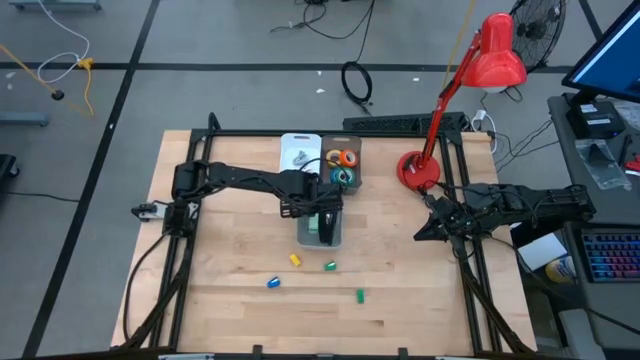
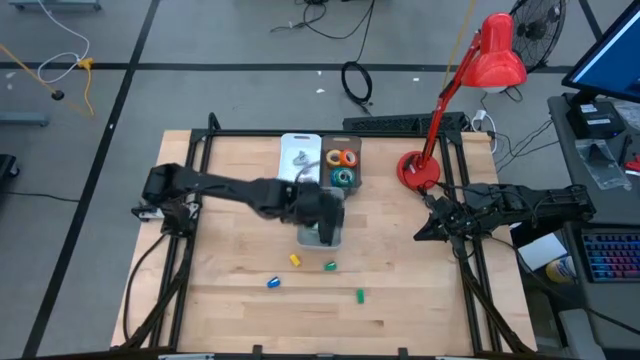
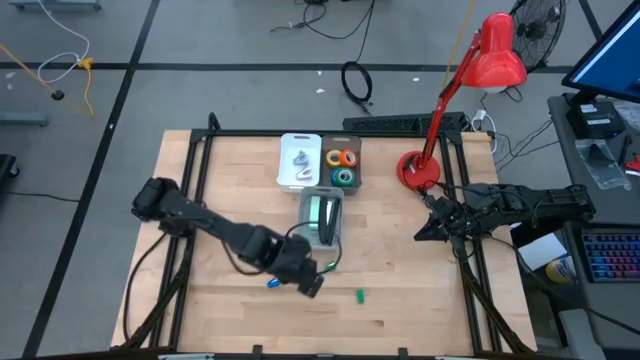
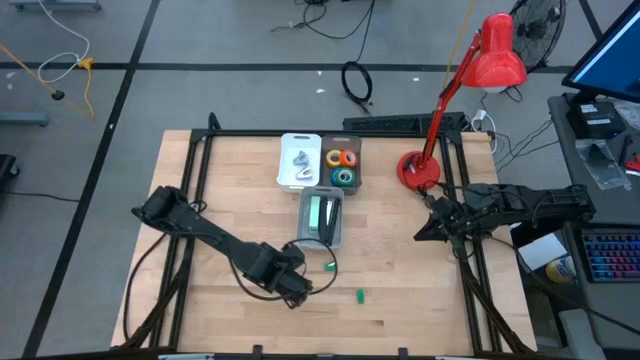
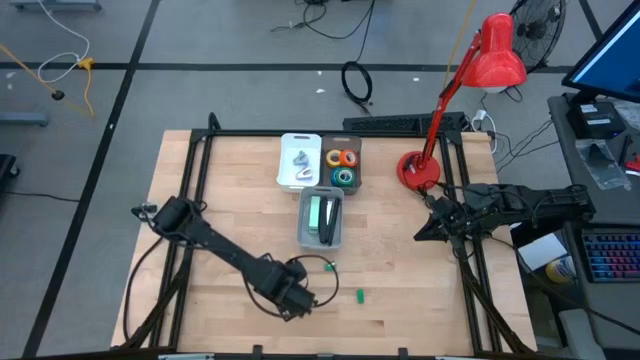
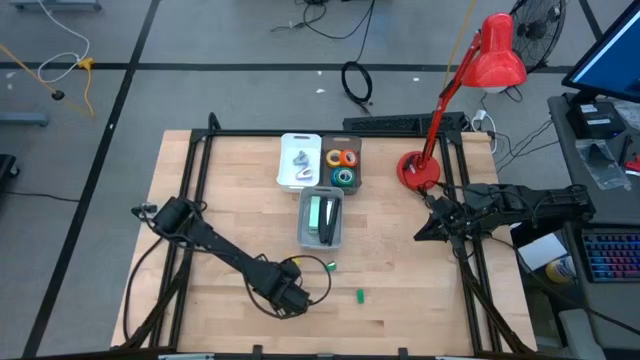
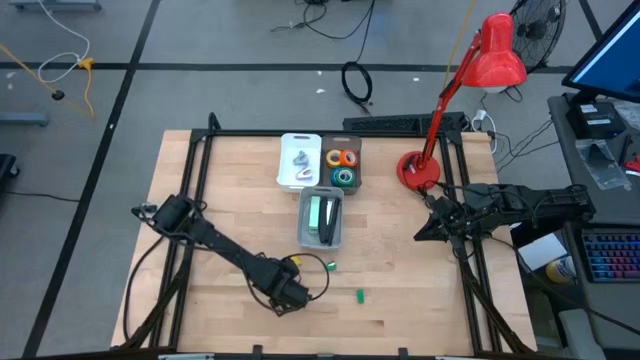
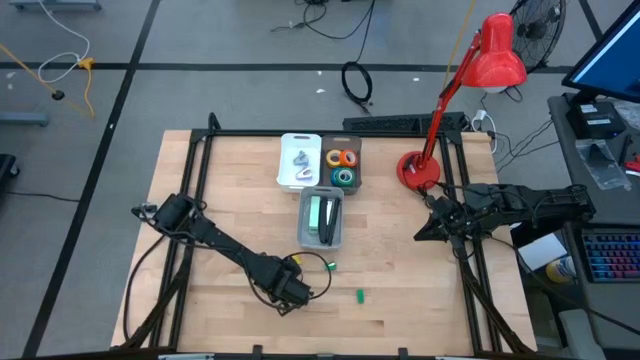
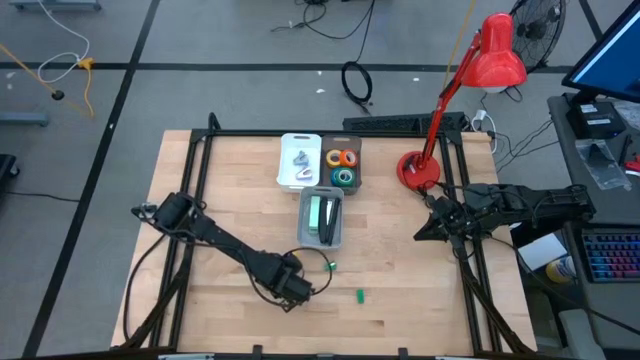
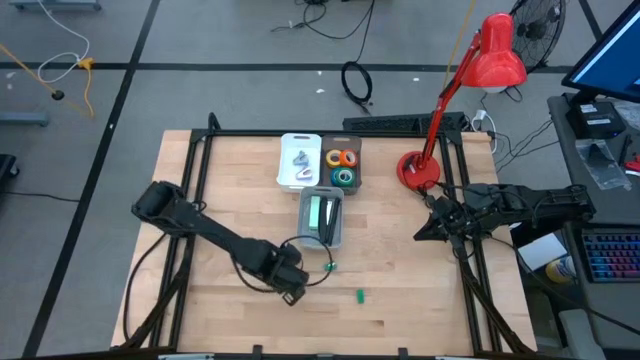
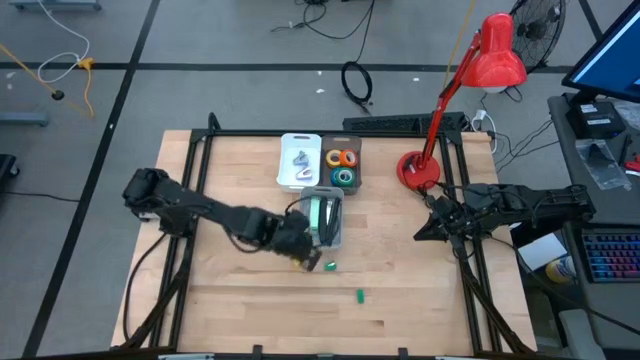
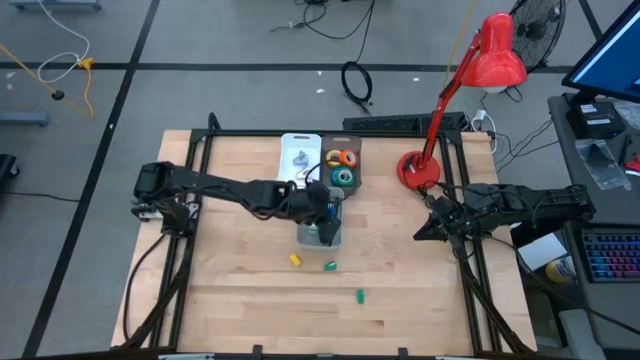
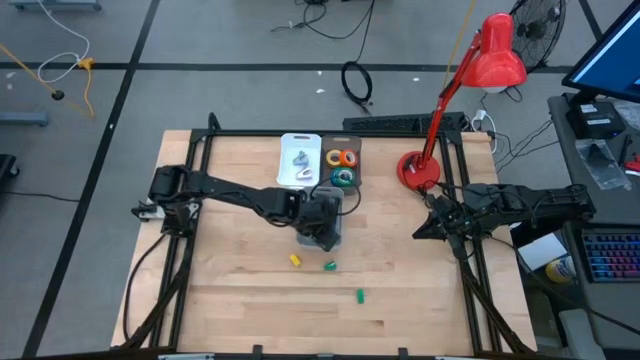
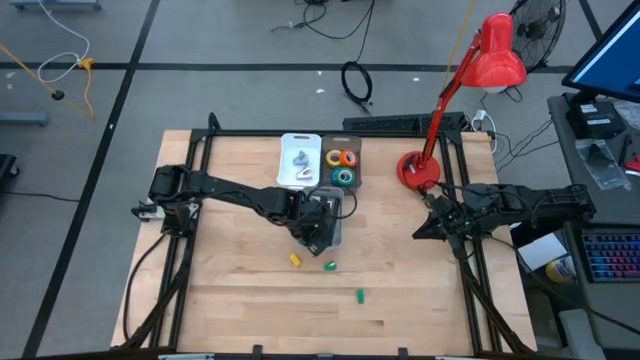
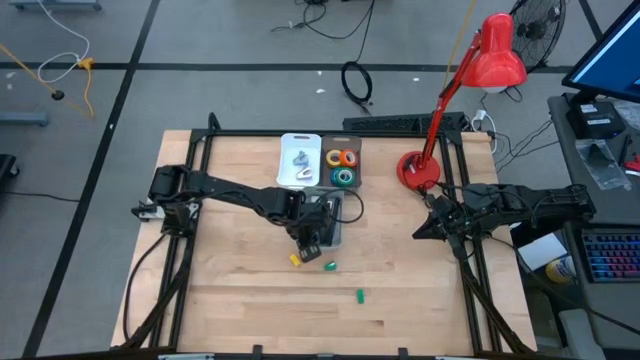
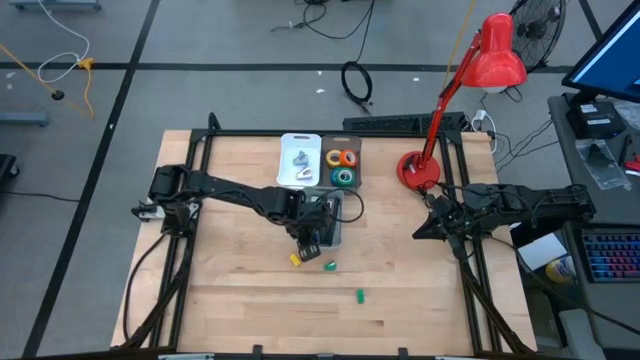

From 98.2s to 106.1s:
Task: Pick and place Stapler, Stapler remover, tape
Put the blue stapler into the gray bin

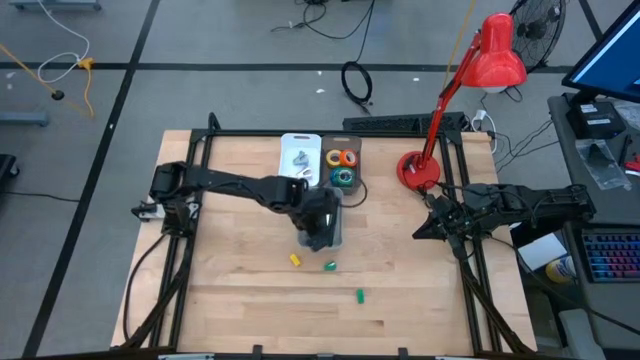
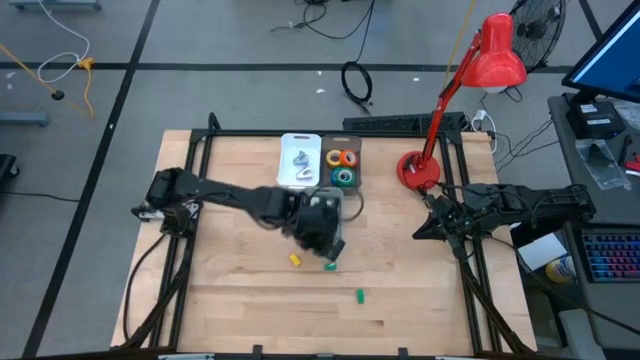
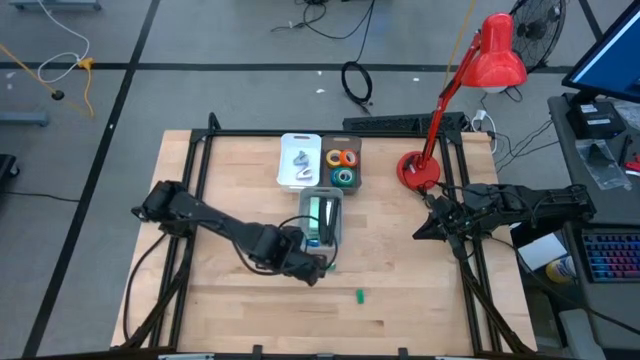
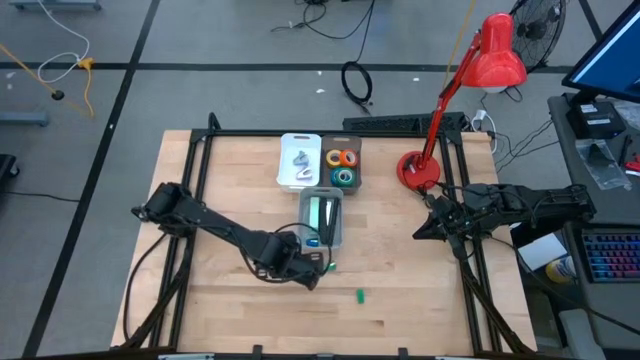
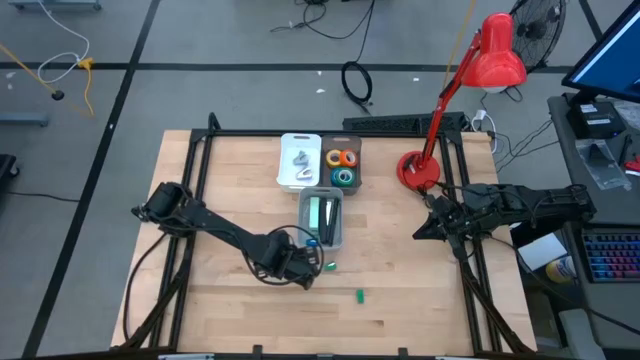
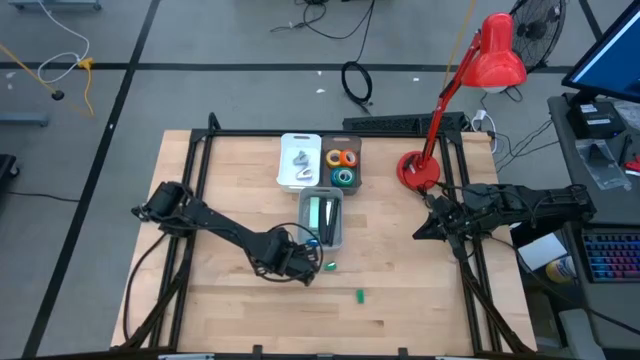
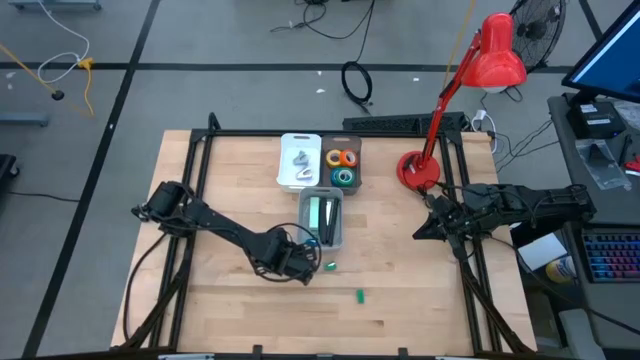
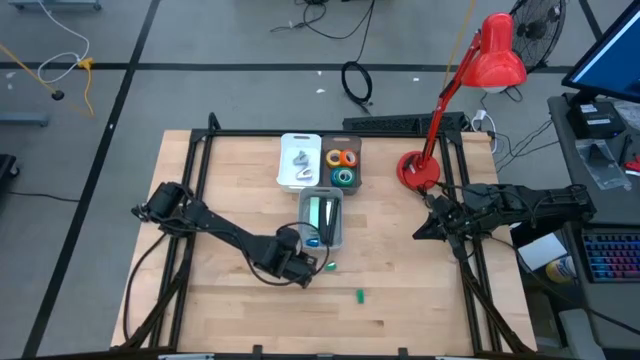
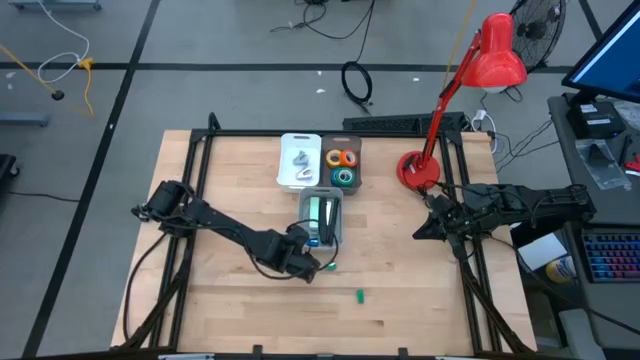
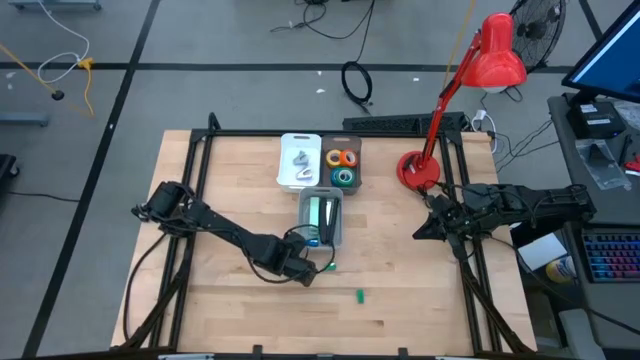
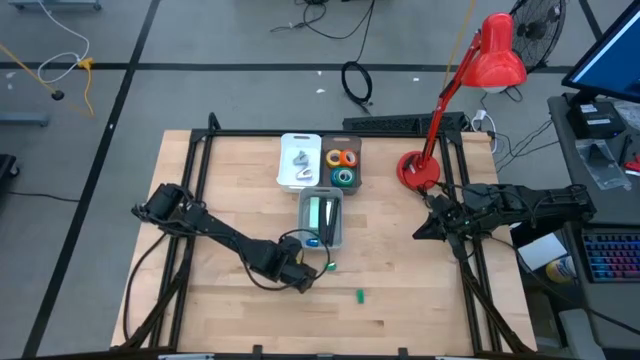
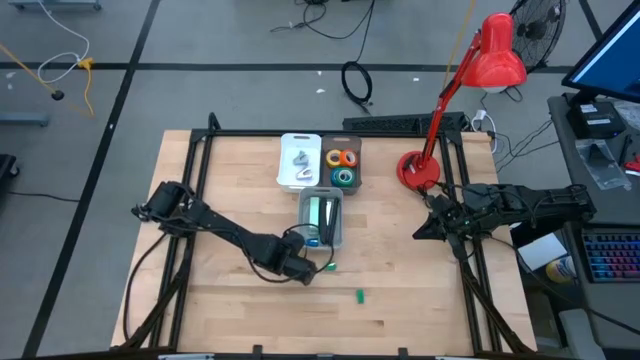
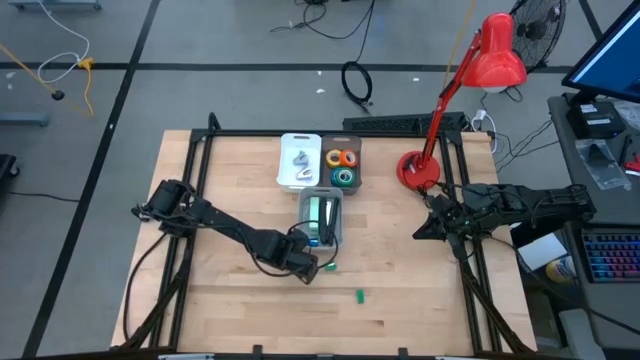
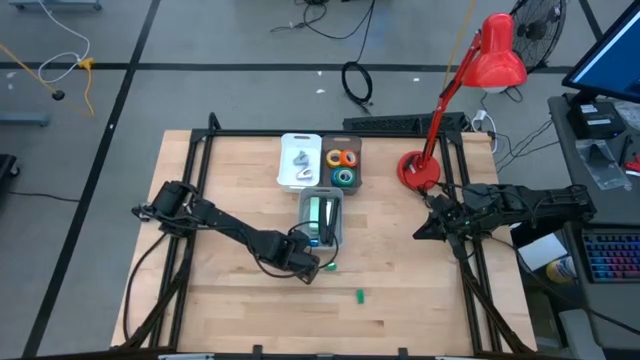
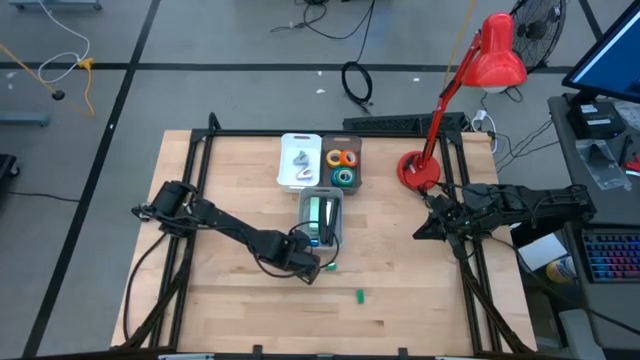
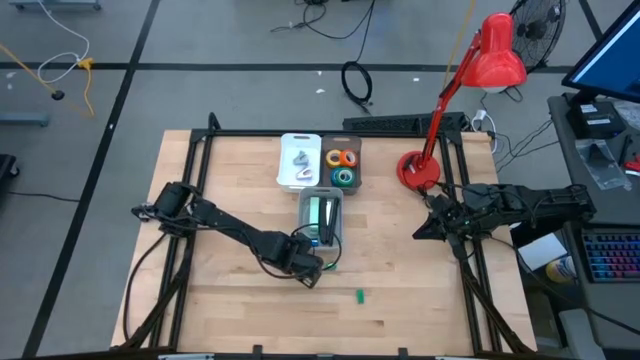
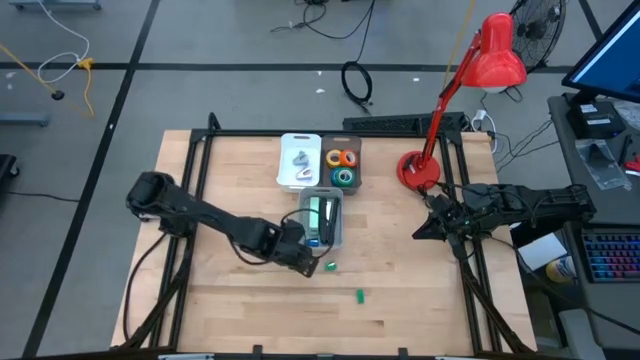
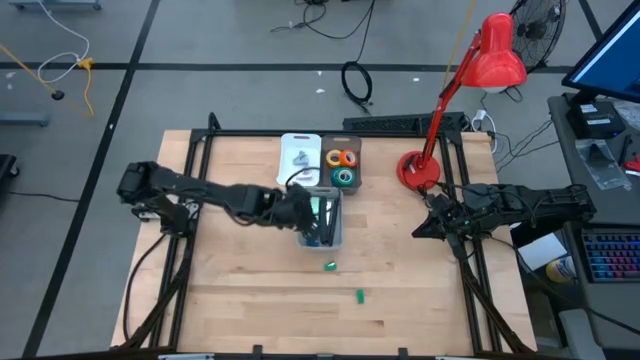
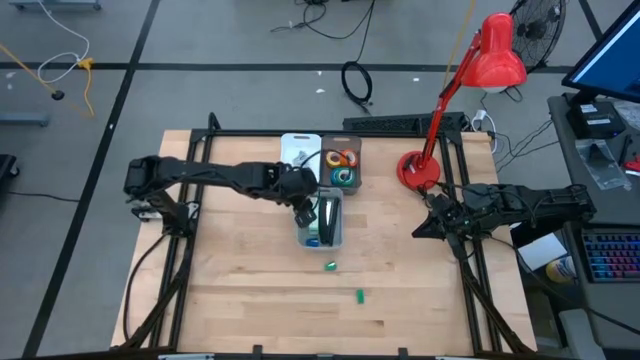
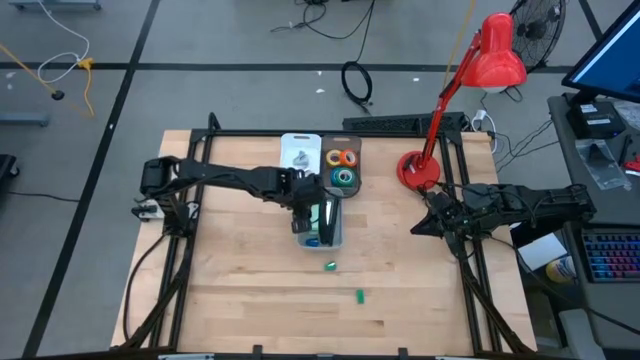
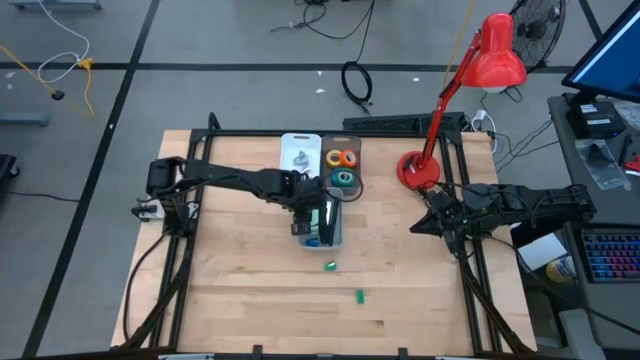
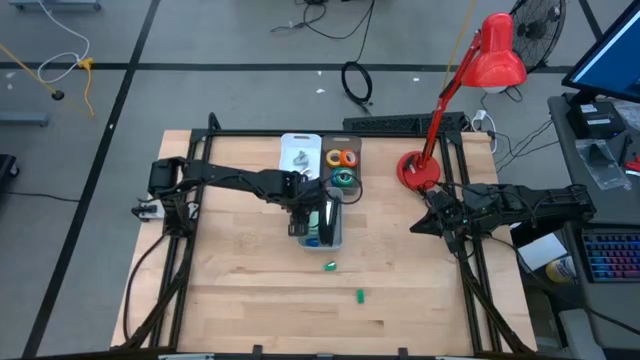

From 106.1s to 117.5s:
Put the yellow stapler into the gray bin

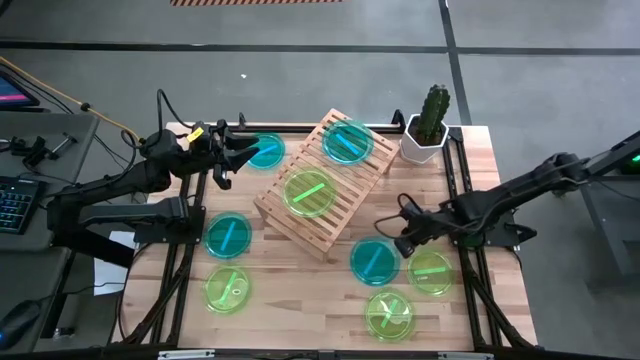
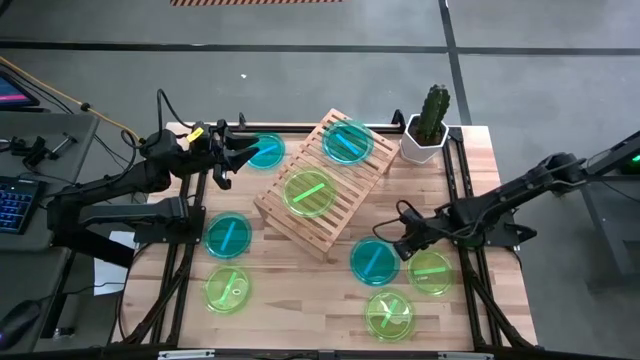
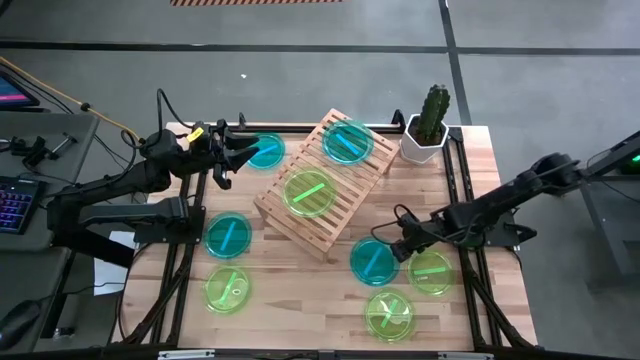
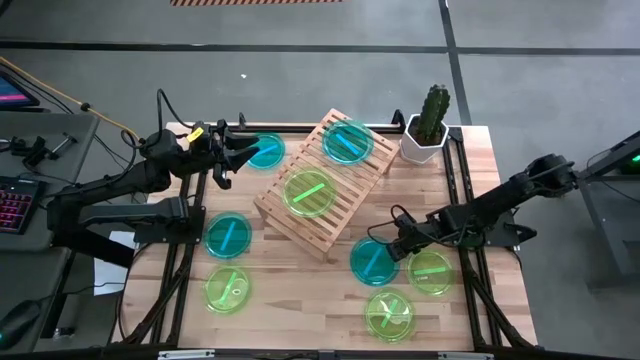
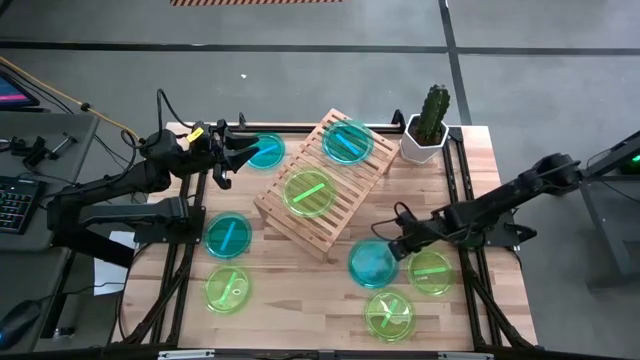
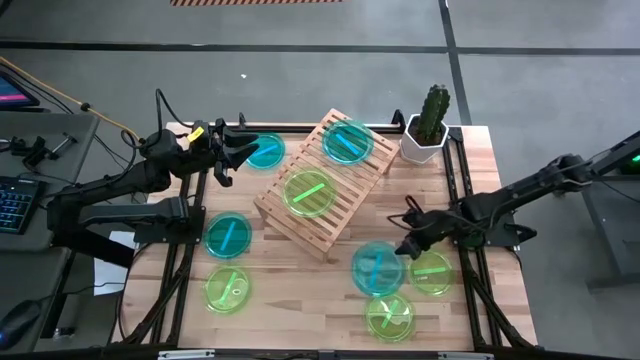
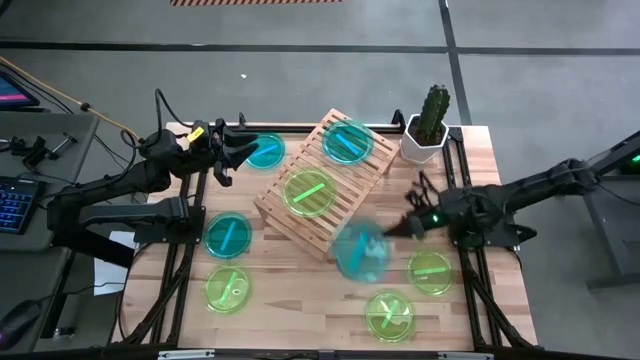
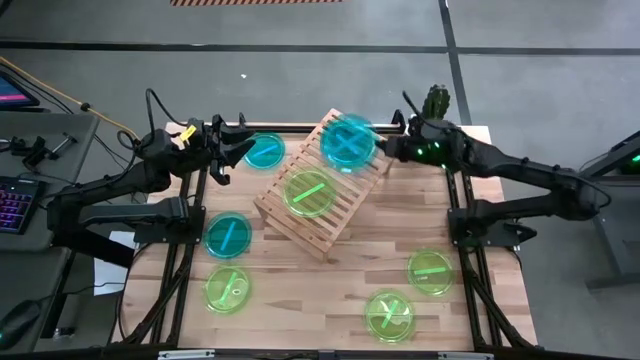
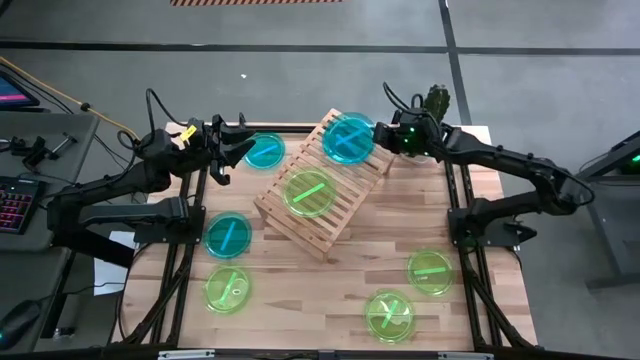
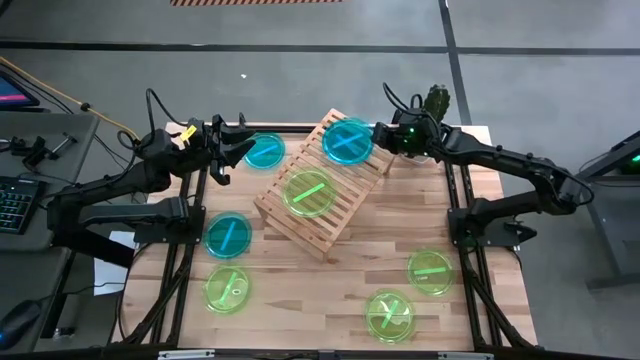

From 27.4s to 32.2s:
Task: Place and stack plates onto a shelf
Stack the blue plate on top of the blue plate on the shelf
